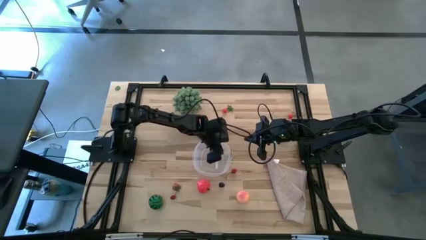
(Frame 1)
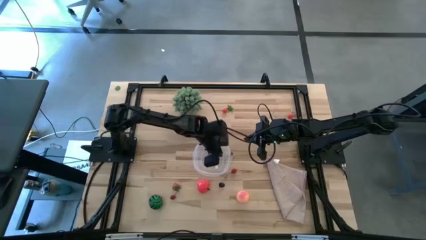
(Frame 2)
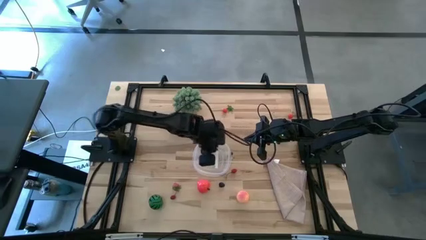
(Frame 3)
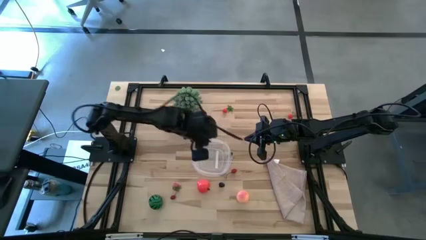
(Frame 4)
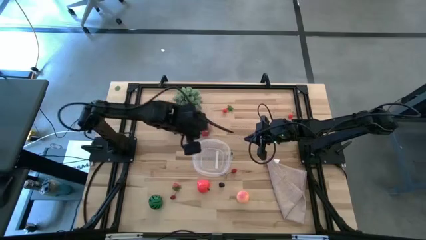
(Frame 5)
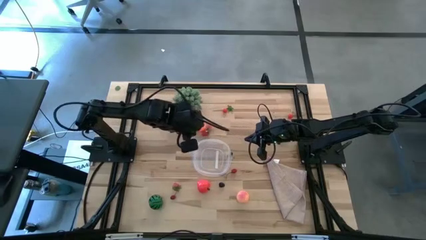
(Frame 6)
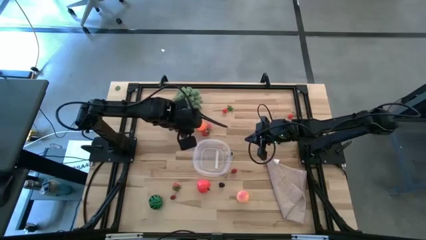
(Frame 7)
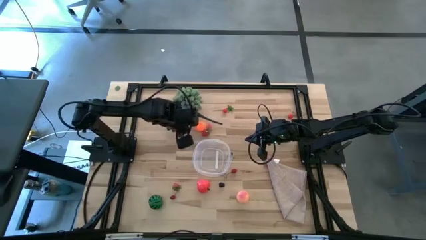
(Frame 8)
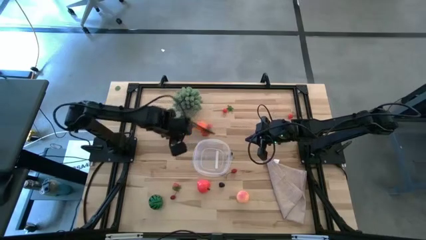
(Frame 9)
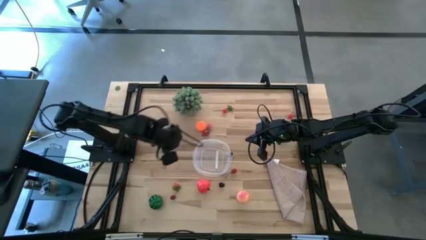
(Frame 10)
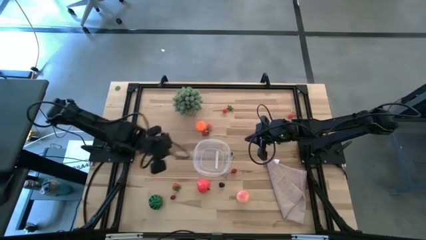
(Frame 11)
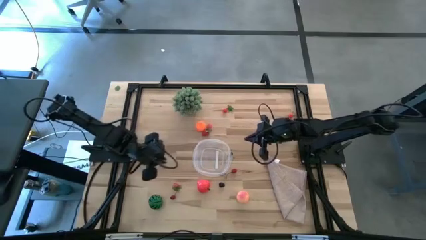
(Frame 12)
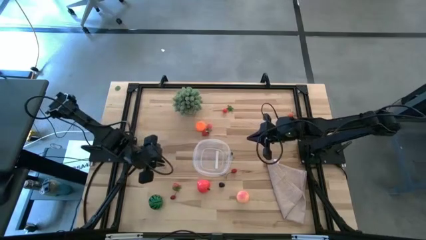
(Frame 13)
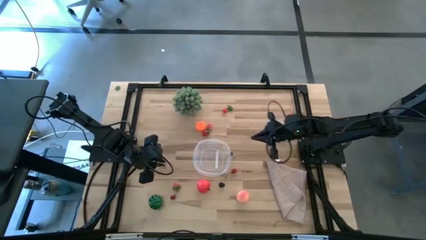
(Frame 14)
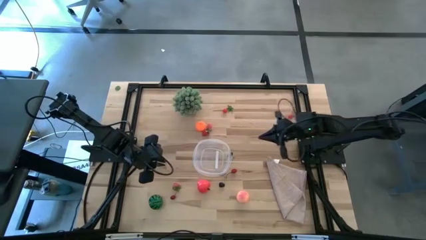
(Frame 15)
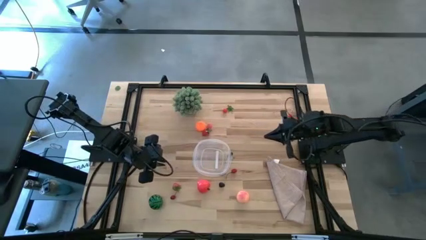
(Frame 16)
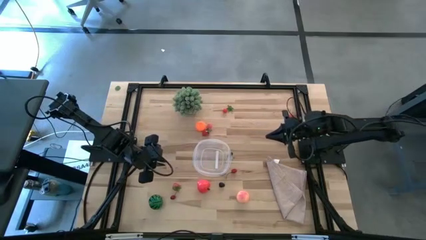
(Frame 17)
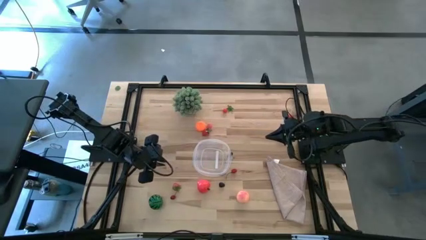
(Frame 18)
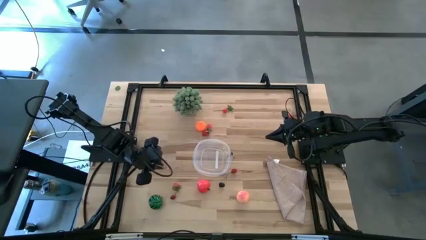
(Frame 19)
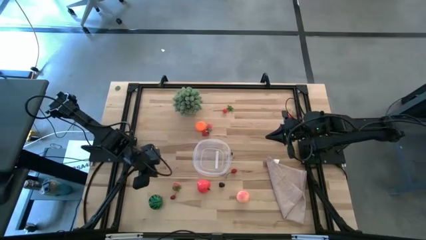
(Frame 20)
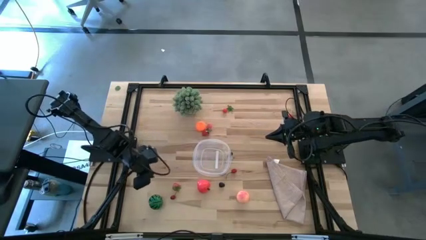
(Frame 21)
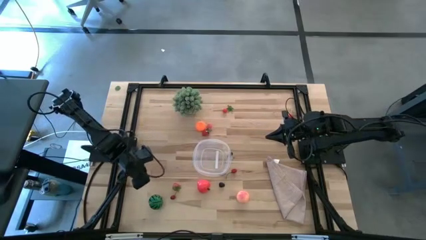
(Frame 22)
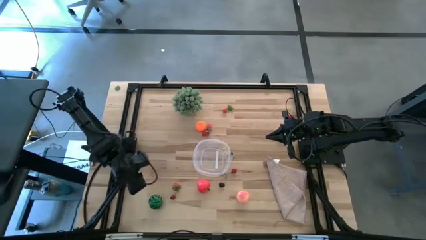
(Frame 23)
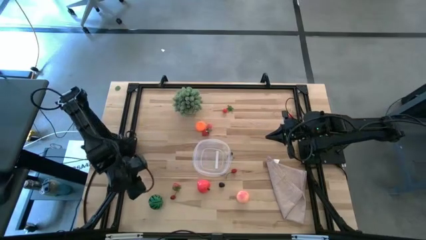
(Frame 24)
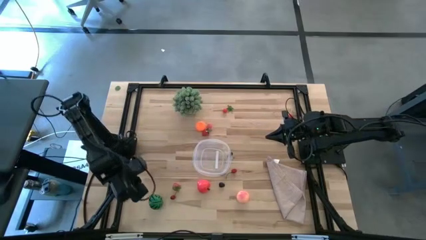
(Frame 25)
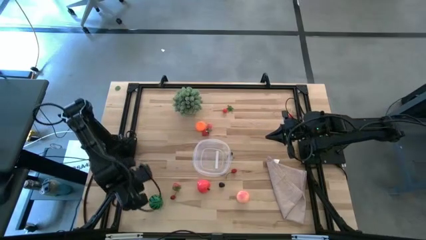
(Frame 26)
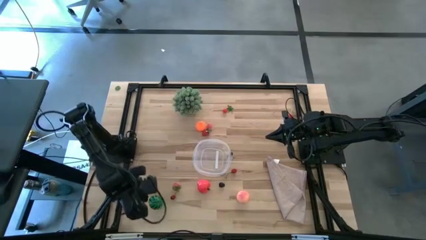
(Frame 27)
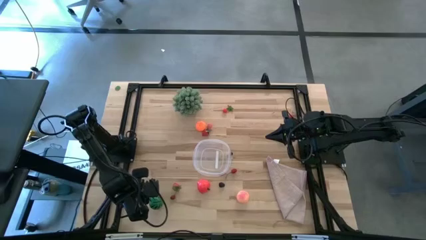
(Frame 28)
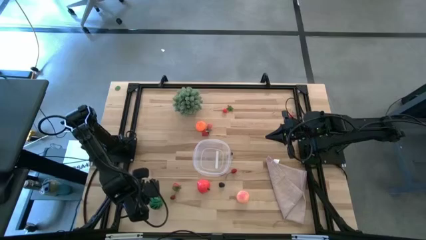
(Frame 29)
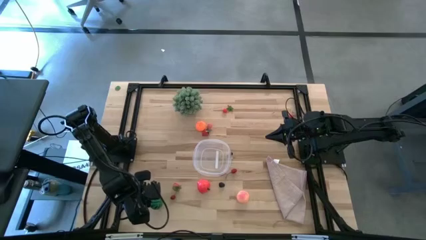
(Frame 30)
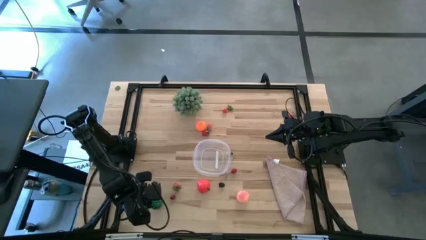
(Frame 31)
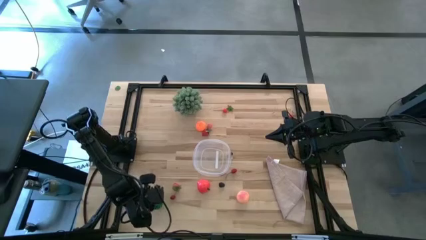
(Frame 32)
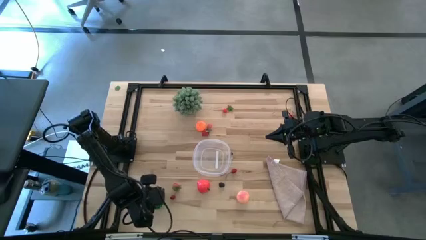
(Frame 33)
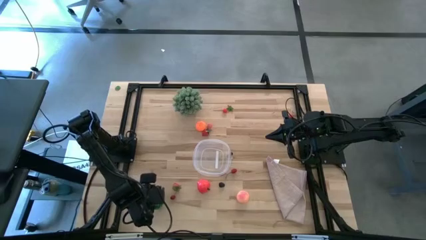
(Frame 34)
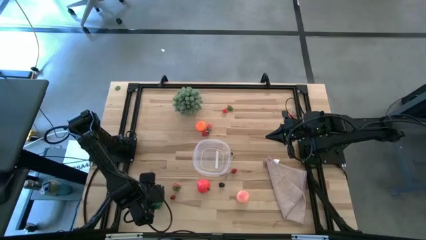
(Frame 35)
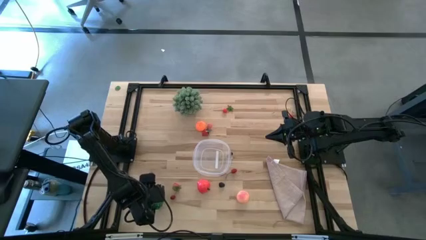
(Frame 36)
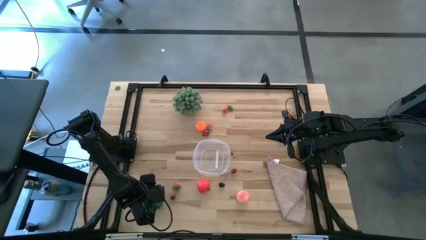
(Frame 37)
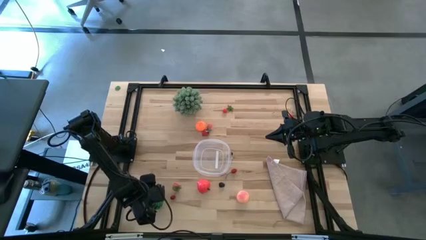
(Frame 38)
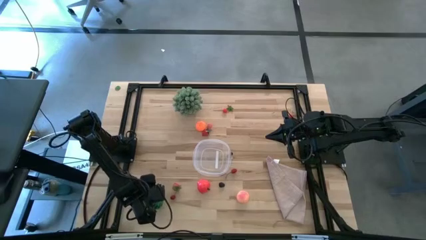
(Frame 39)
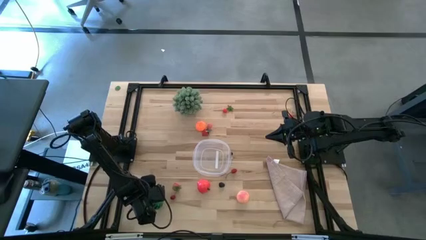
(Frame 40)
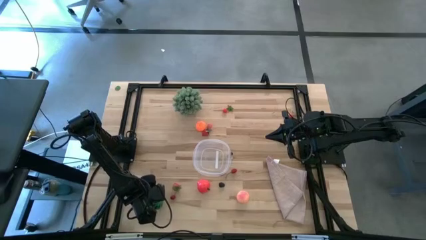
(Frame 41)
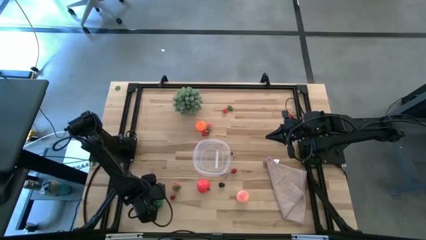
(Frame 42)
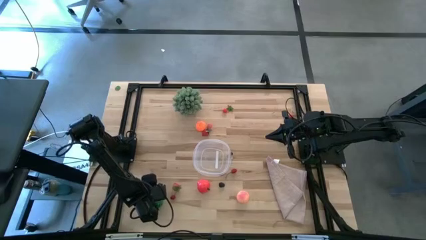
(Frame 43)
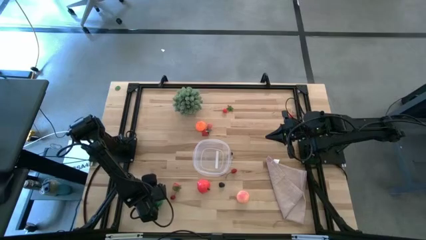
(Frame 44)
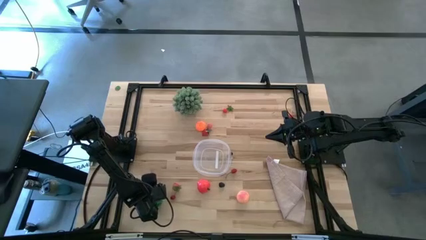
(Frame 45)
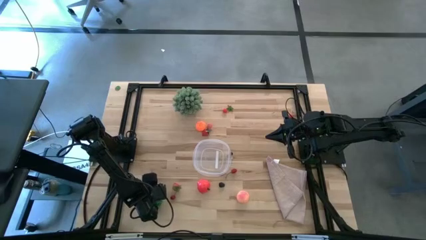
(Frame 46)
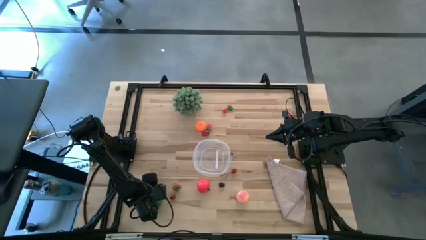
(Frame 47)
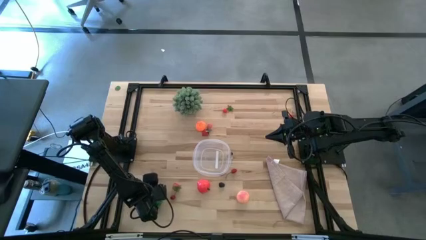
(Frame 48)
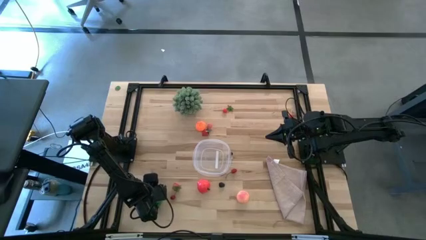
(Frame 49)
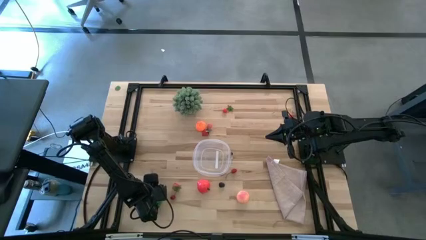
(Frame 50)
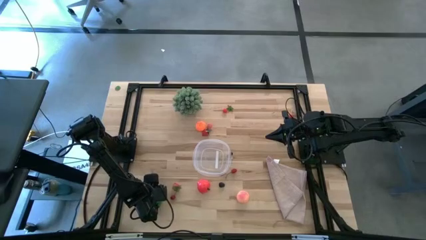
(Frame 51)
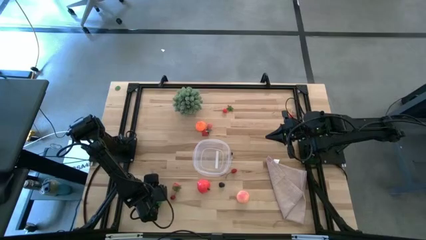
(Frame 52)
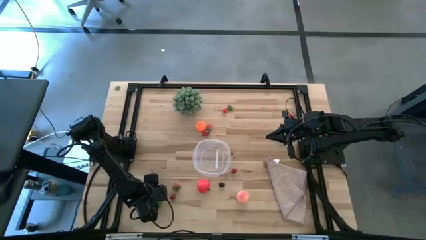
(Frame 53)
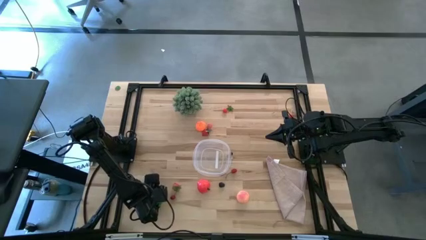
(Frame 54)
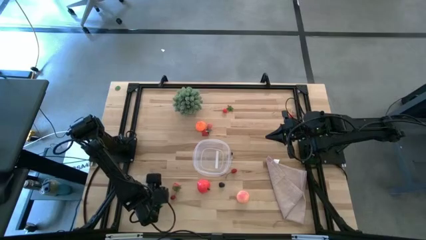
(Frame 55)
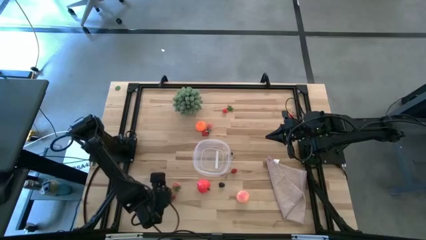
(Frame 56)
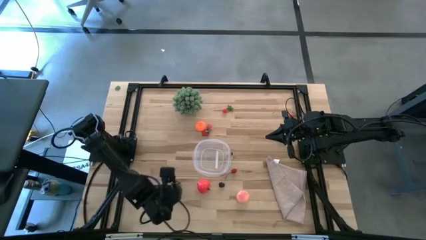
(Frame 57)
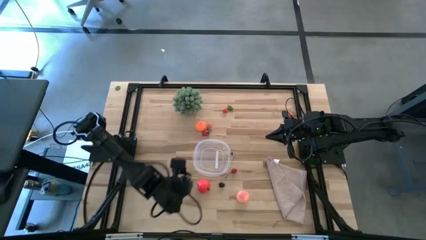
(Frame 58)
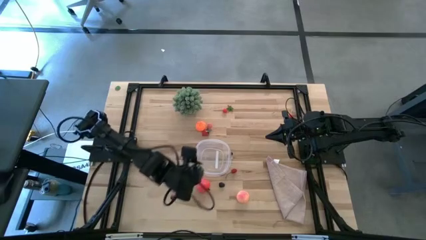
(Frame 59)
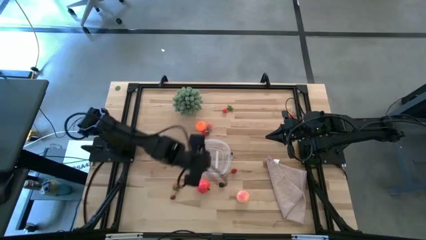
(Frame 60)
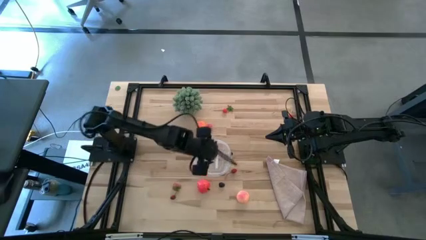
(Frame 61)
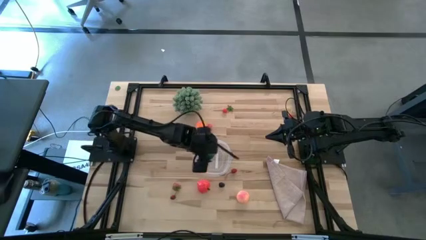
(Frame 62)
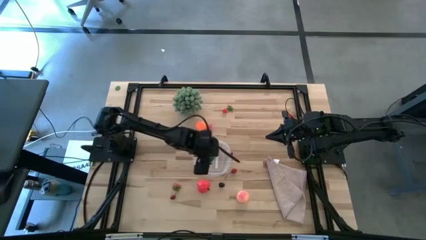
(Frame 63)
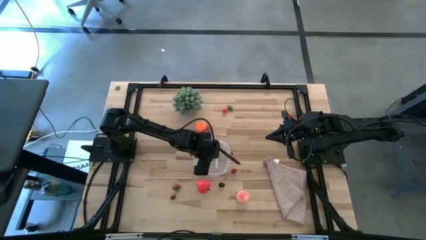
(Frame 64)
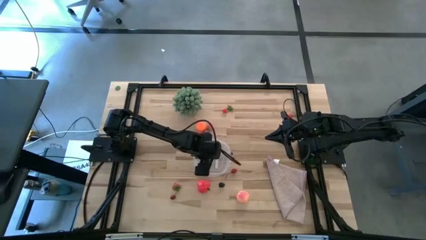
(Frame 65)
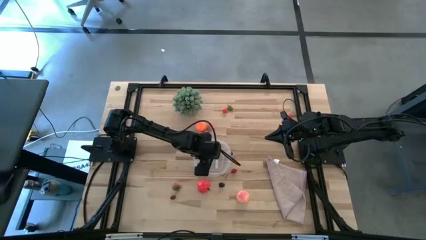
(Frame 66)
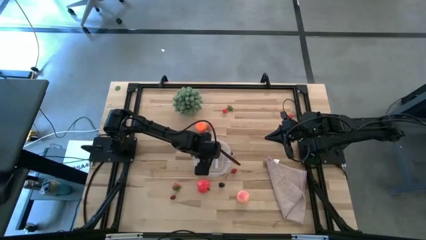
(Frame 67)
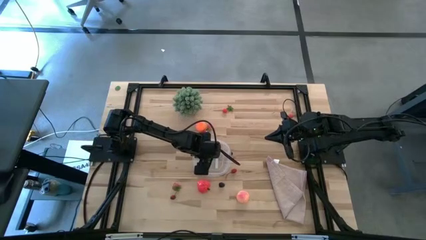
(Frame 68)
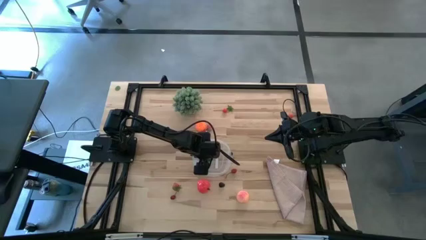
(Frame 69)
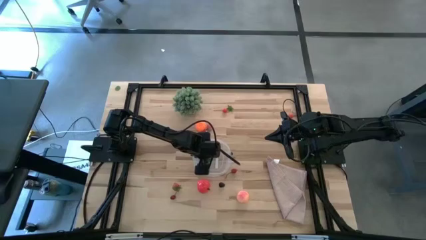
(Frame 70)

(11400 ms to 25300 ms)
Task: Pick and placing Produce into tupperware
Put the watermelon into the transparent container

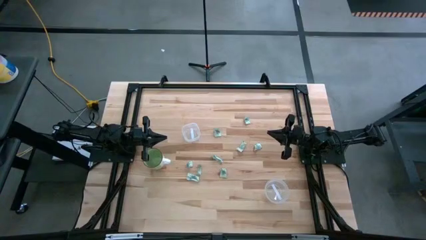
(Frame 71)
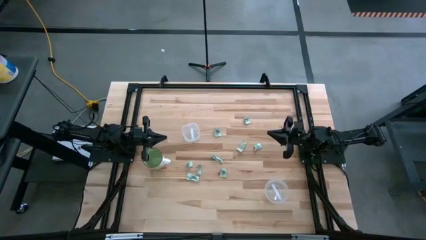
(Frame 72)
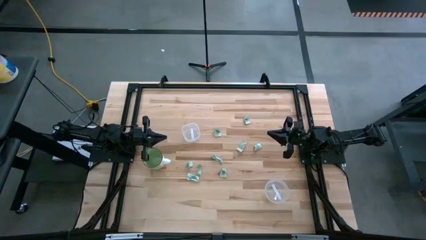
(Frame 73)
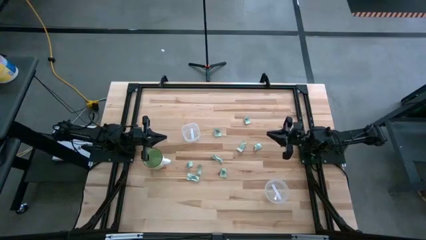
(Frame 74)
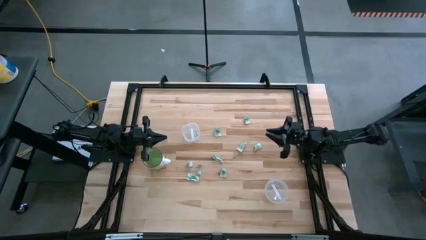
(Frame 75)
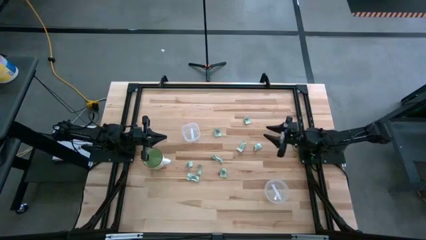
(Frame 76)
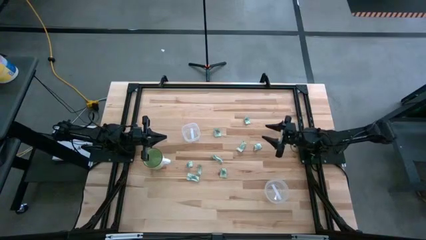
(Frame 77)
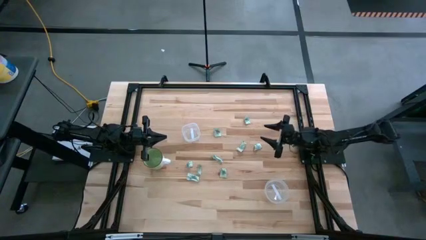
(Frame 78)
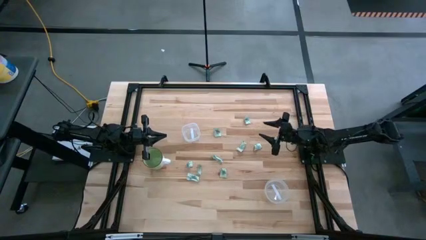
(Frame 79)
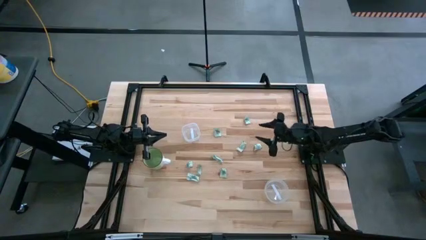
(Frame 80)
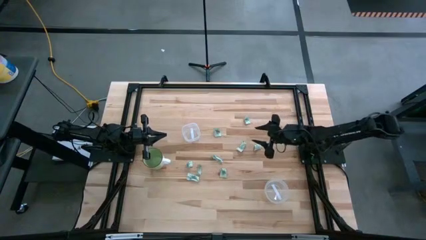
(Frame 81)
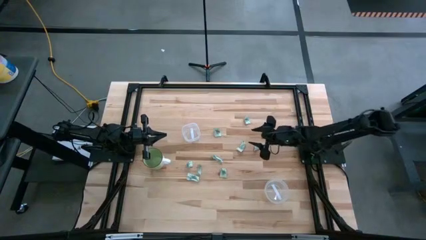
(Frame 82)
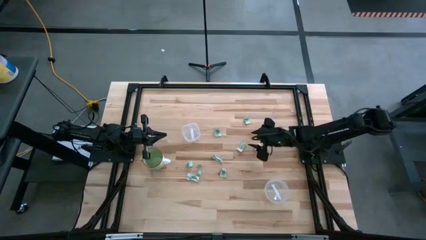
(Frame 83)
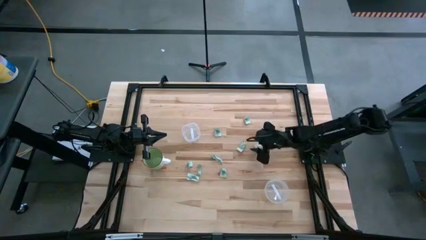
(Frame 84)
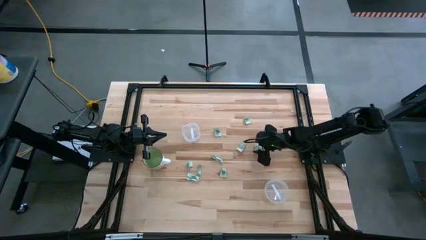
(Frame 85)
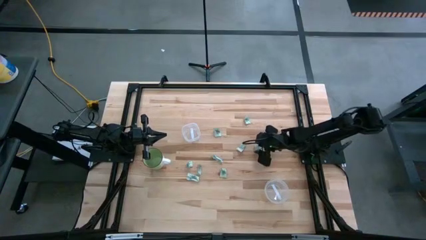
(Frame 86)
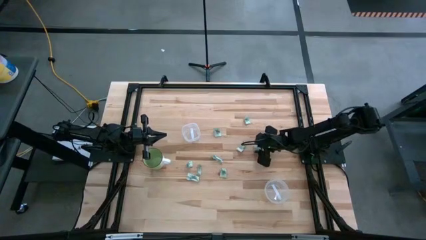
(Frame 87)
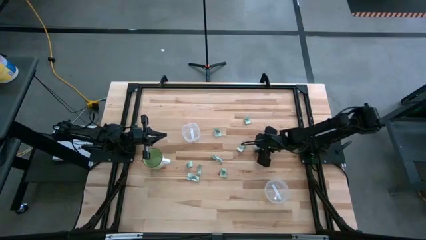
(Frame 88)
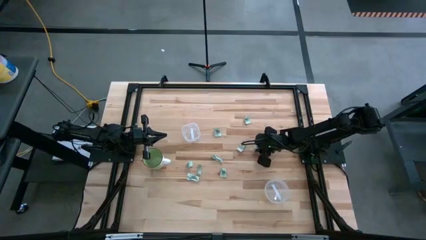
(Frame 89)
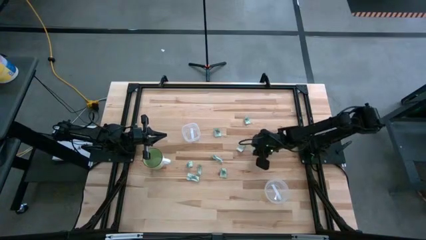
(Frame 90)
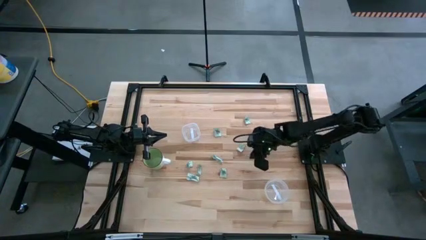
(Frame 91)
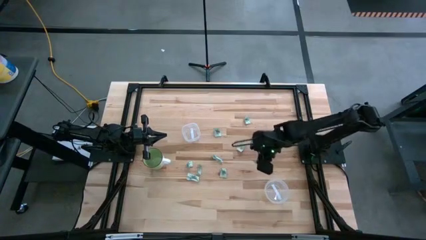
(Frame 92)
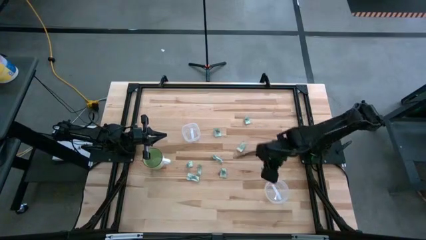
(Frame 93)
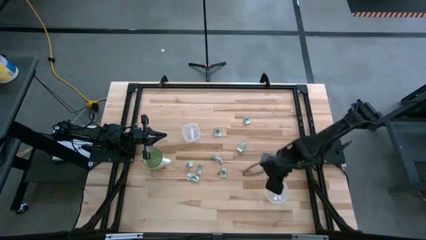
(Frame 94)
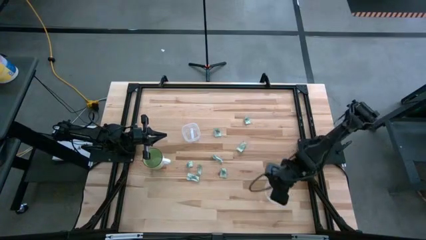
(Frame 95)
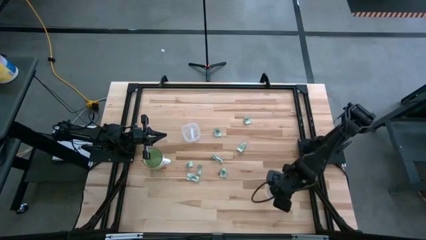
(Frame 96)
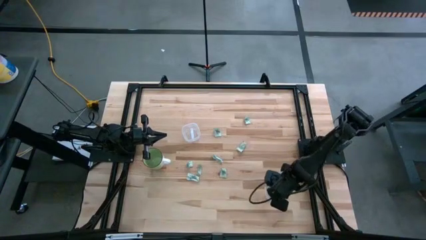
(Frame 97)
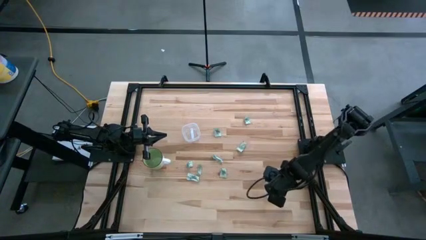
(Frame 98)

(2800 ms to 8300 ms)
Task: Pick and place items into bin
Put the green stevia packet into the bottom transparent bin
